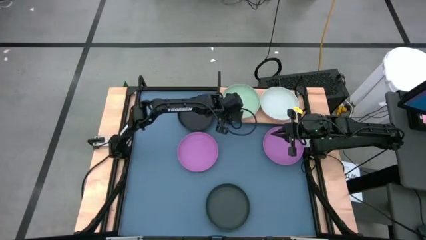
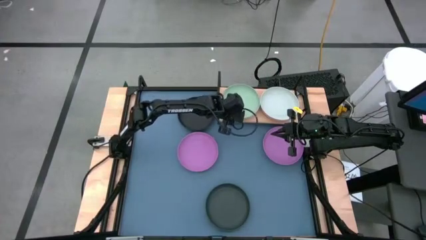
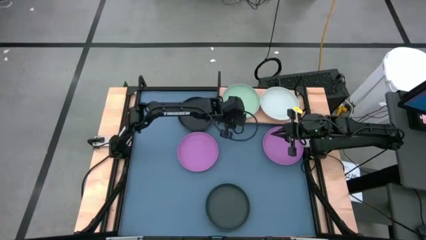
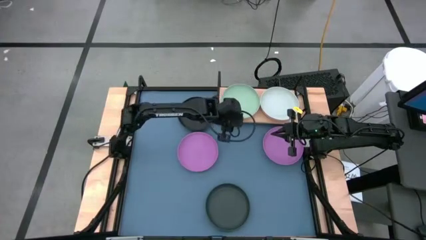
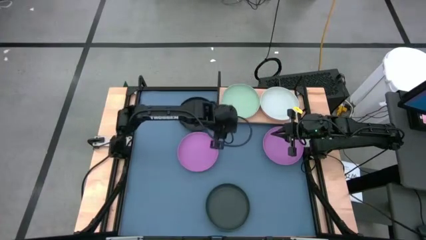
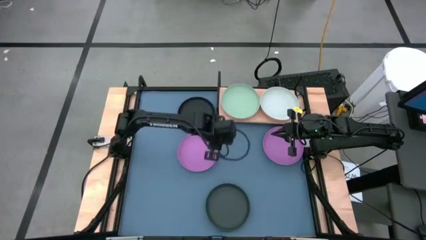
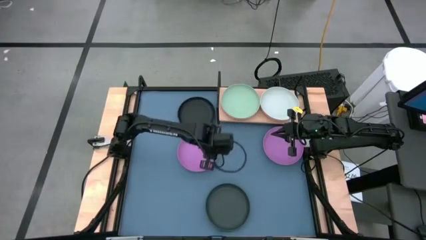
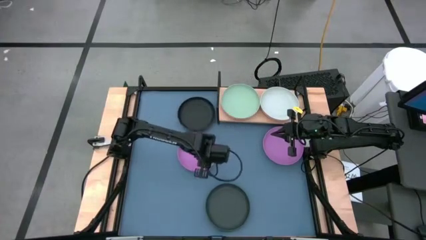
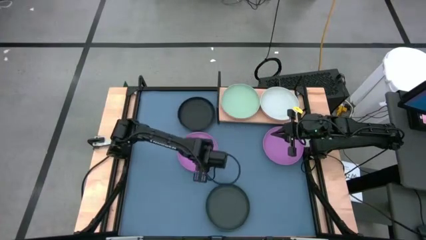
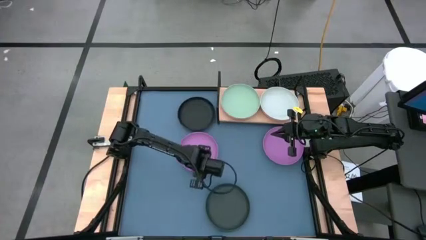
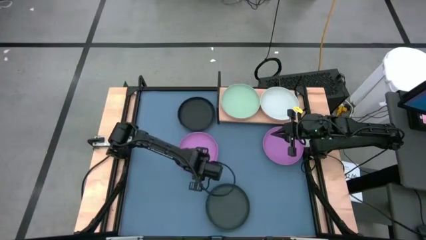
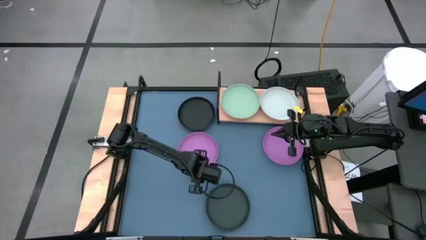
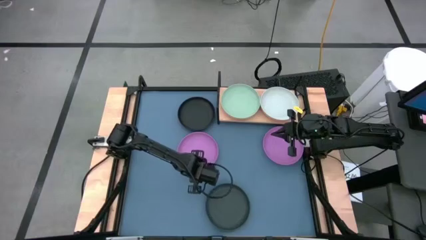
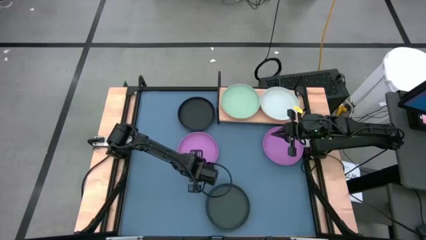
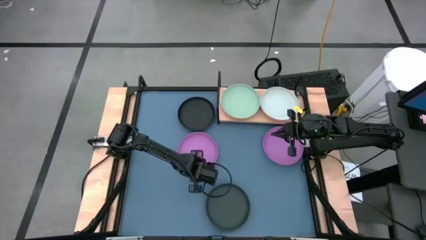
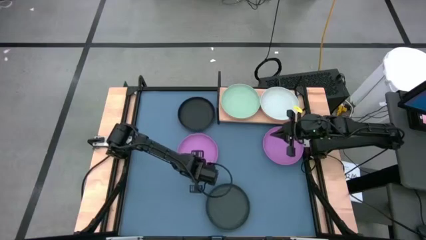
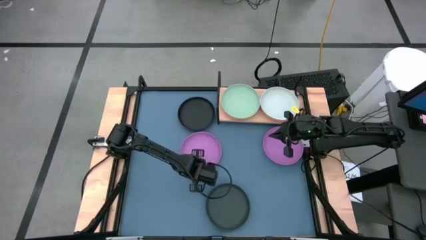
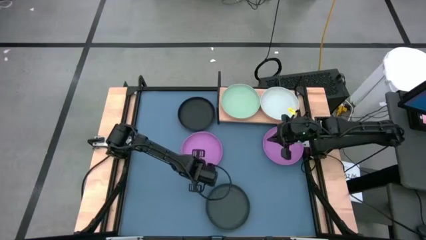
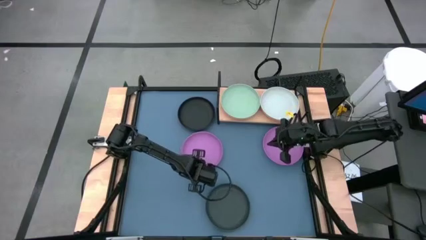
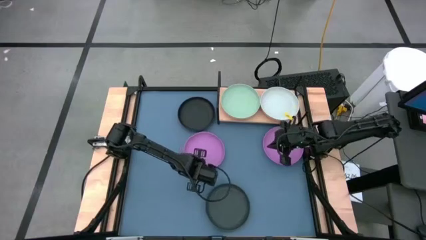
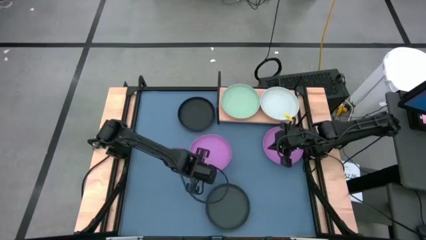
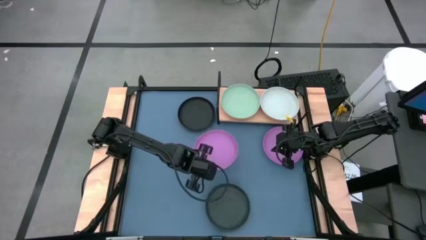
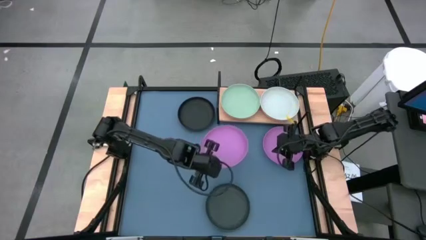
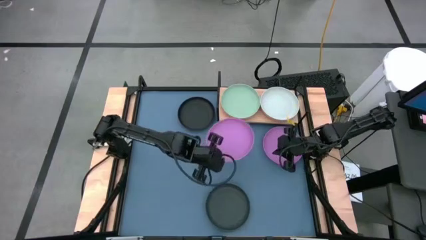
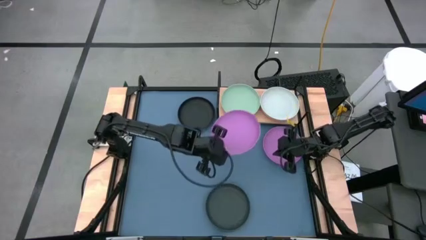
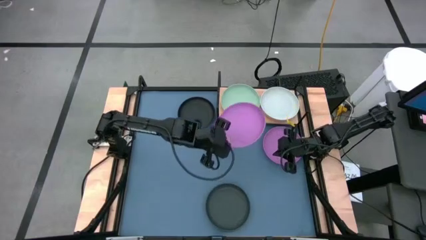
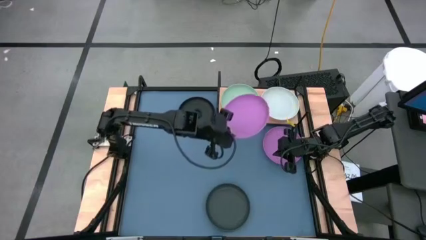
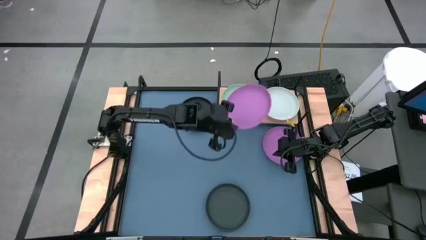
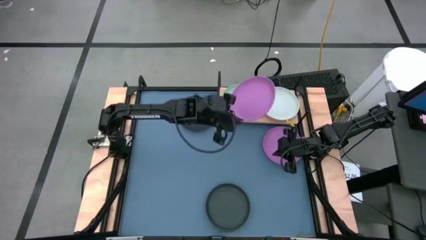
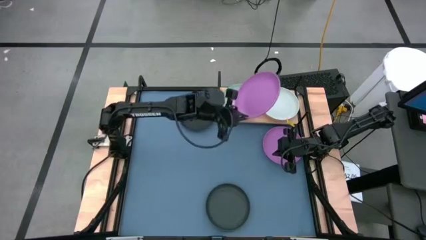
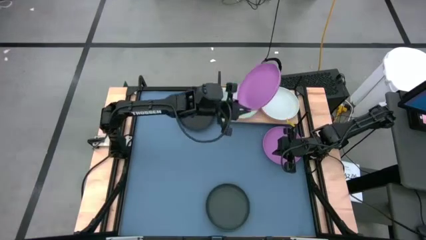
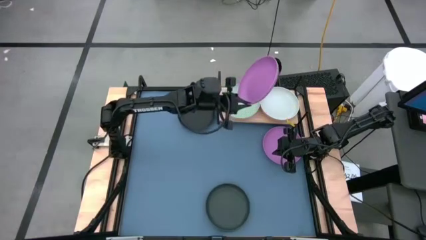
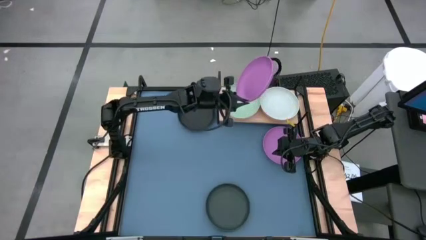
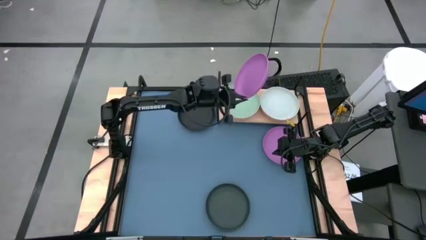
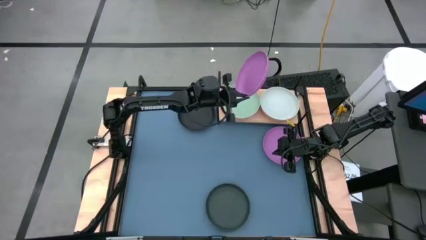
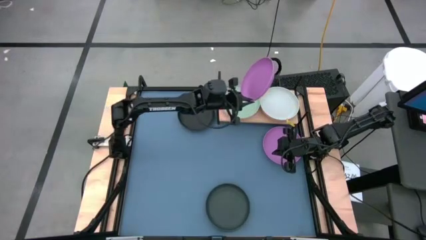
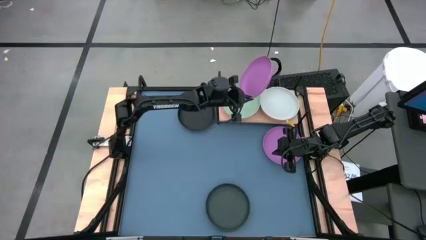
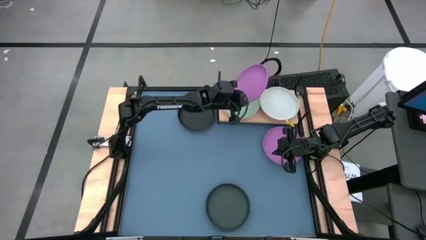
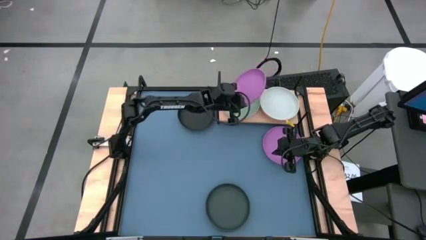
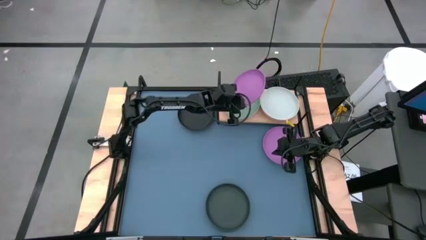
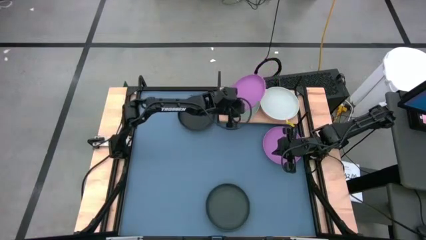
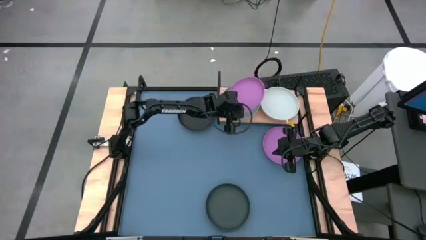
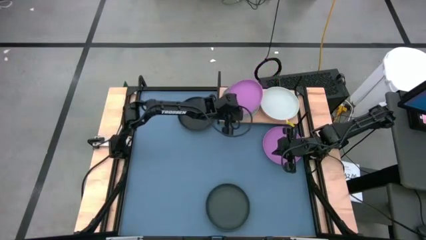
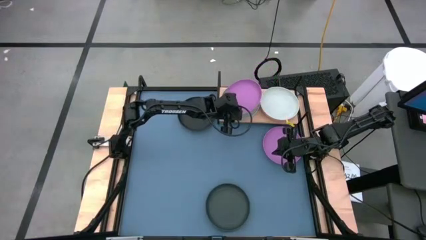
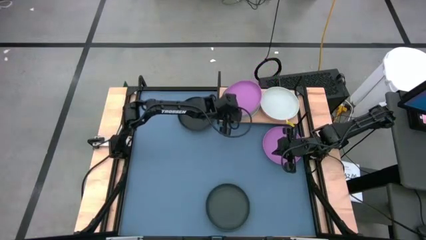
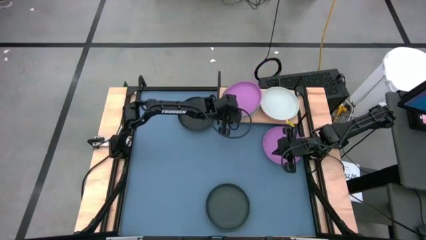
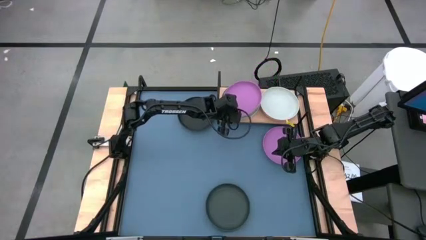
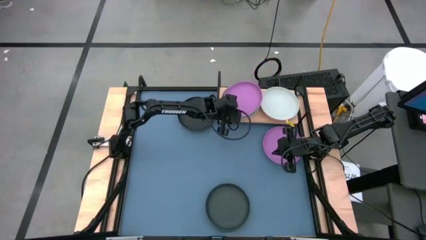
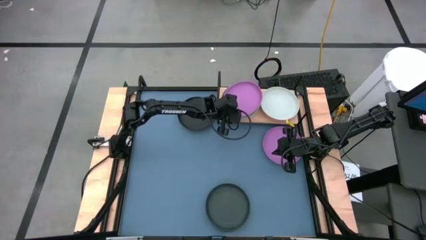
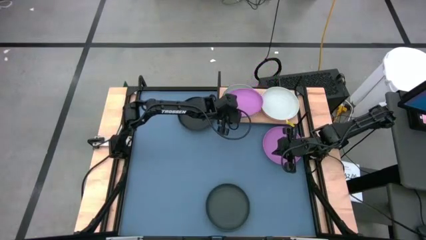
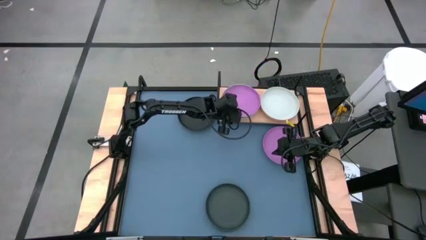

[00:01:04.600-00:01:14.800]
Task: Place and stack plates onto a shelf
Stack the left purple plate on top of the green plate on the shelf
